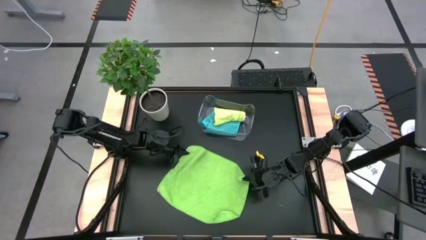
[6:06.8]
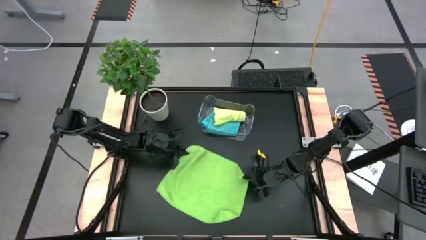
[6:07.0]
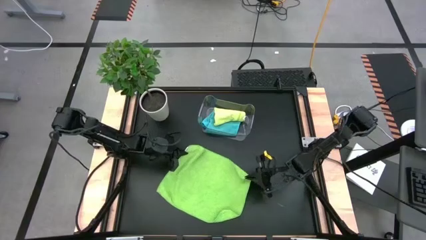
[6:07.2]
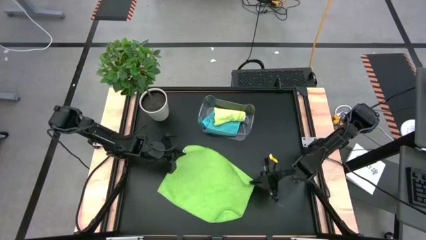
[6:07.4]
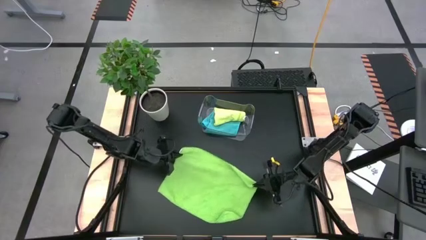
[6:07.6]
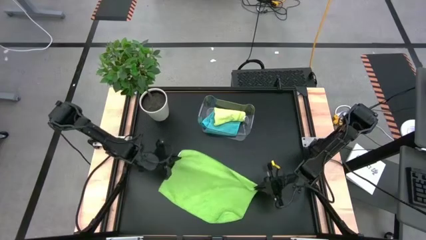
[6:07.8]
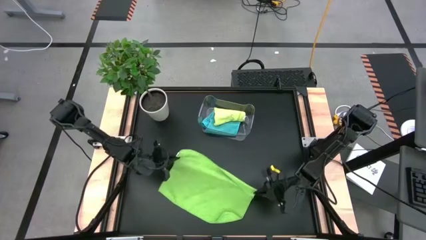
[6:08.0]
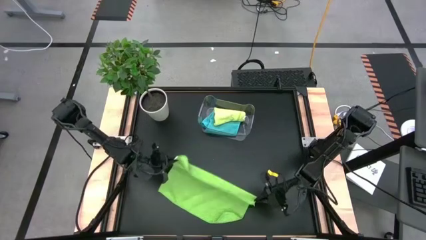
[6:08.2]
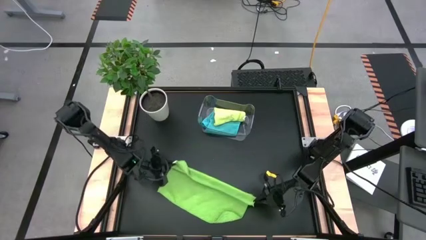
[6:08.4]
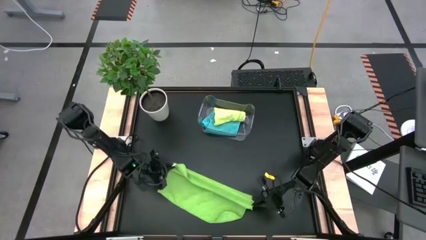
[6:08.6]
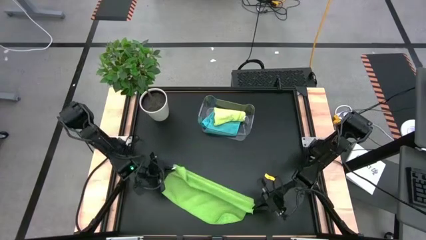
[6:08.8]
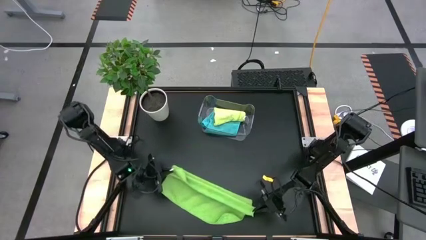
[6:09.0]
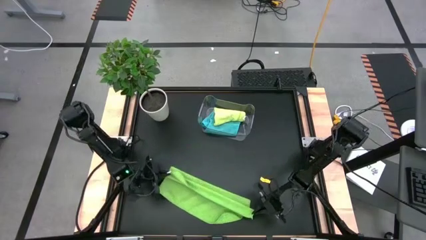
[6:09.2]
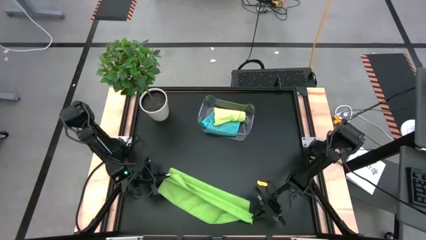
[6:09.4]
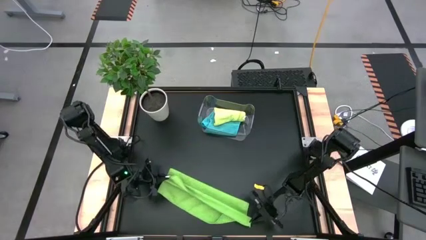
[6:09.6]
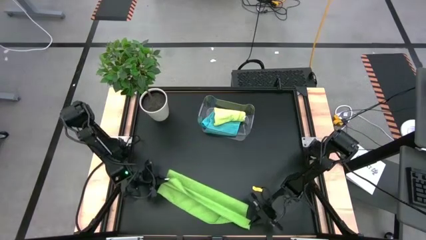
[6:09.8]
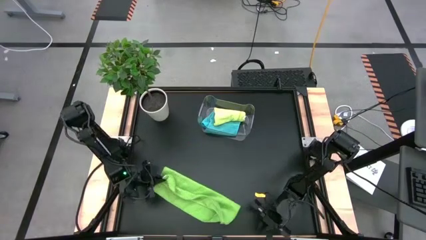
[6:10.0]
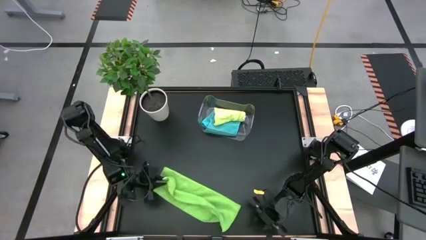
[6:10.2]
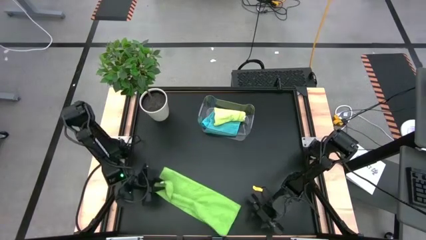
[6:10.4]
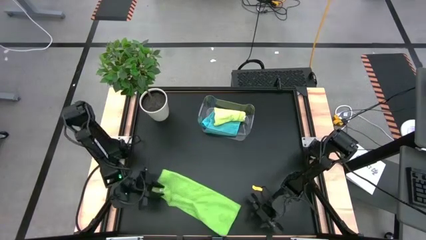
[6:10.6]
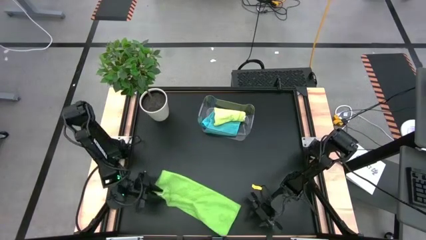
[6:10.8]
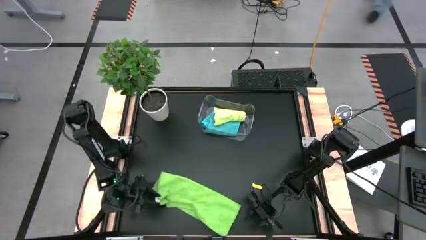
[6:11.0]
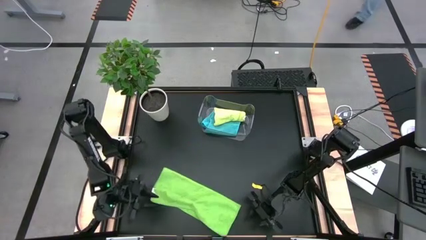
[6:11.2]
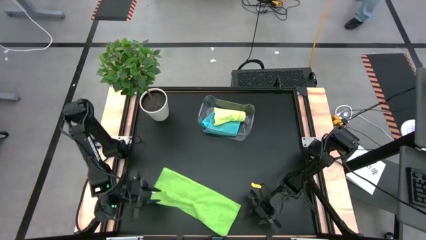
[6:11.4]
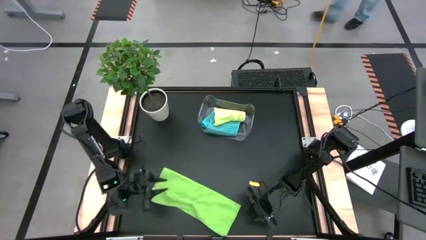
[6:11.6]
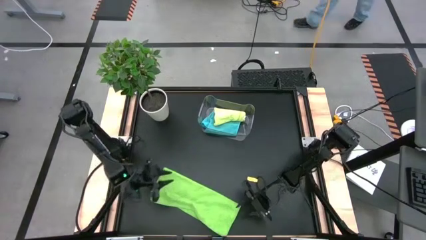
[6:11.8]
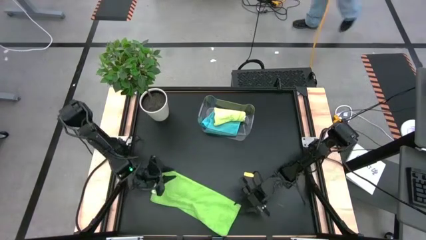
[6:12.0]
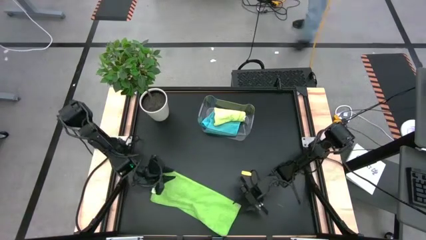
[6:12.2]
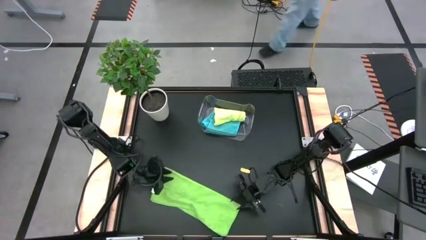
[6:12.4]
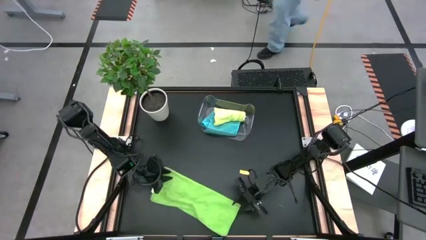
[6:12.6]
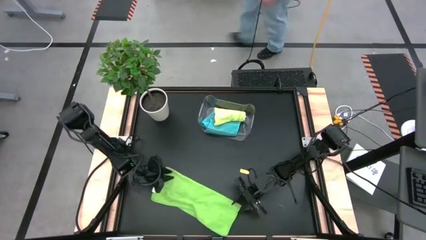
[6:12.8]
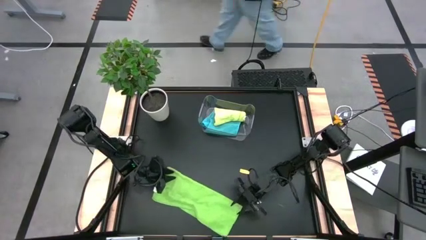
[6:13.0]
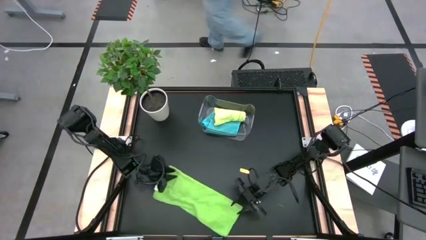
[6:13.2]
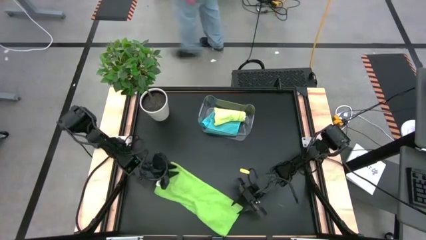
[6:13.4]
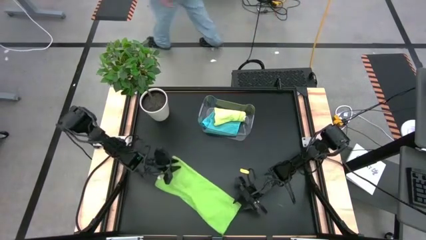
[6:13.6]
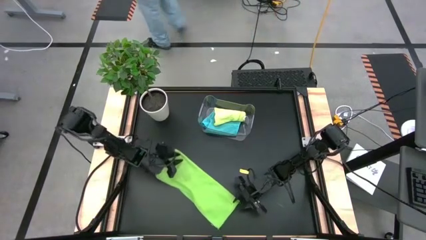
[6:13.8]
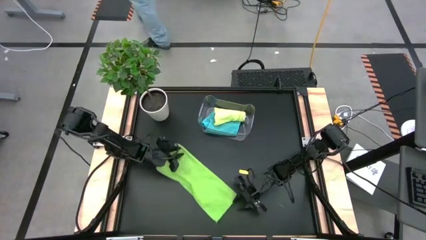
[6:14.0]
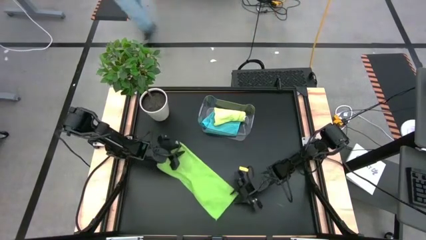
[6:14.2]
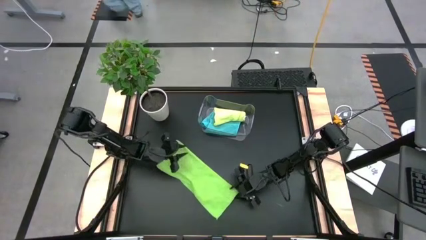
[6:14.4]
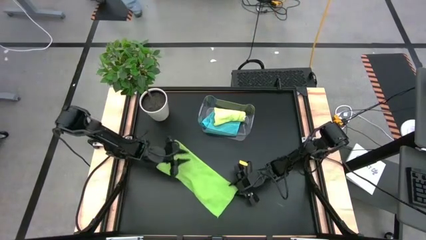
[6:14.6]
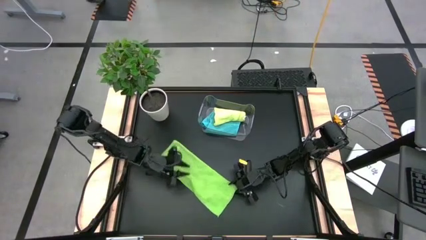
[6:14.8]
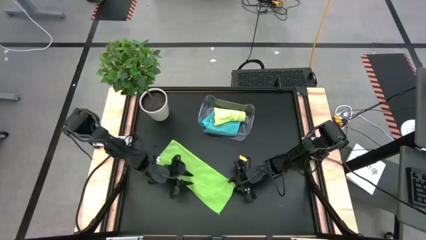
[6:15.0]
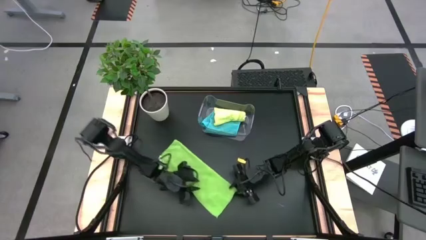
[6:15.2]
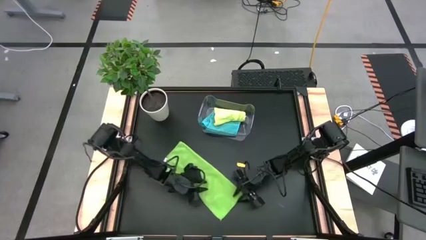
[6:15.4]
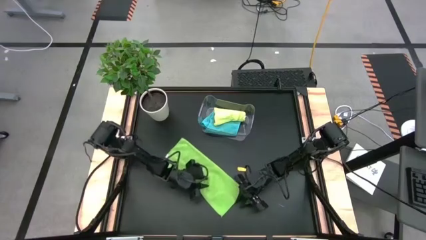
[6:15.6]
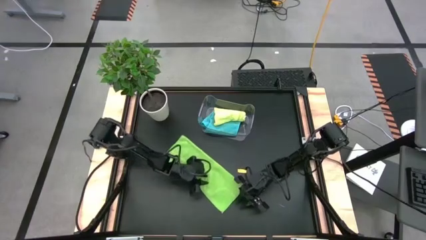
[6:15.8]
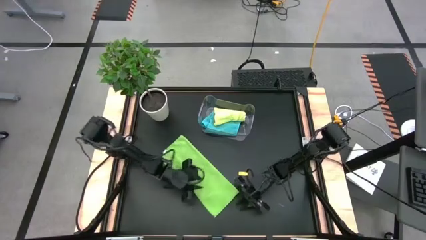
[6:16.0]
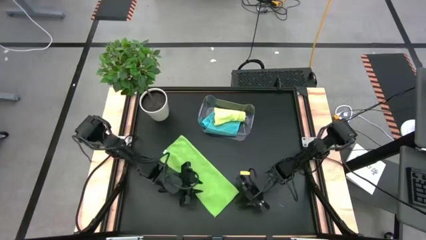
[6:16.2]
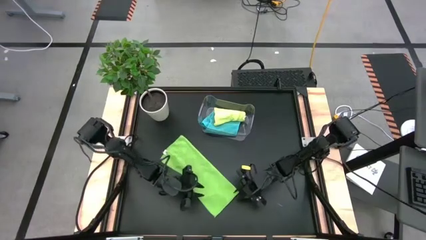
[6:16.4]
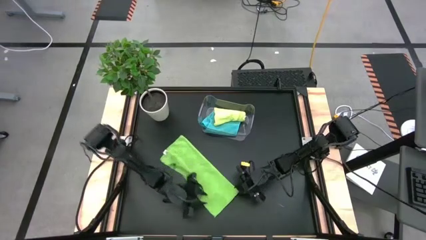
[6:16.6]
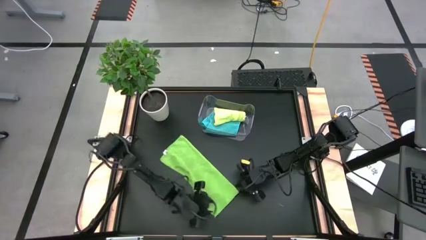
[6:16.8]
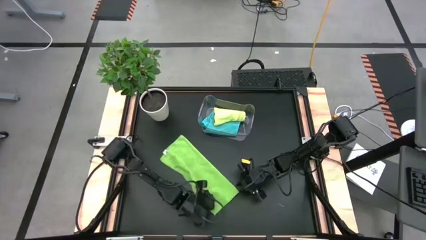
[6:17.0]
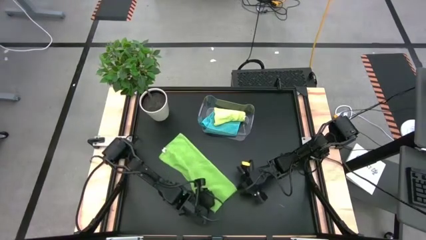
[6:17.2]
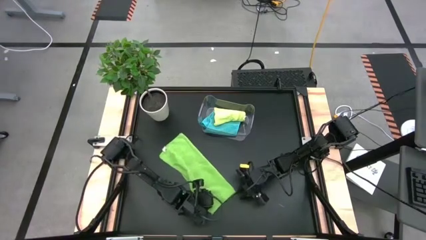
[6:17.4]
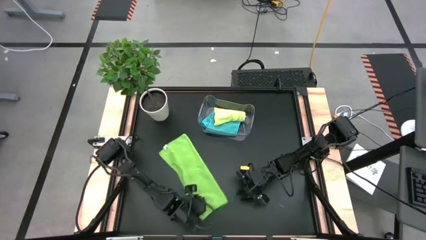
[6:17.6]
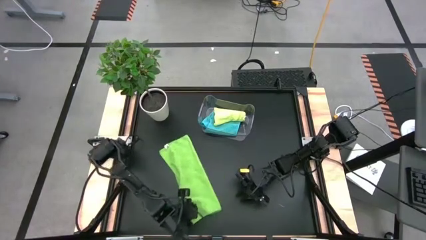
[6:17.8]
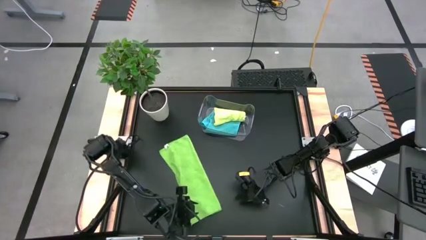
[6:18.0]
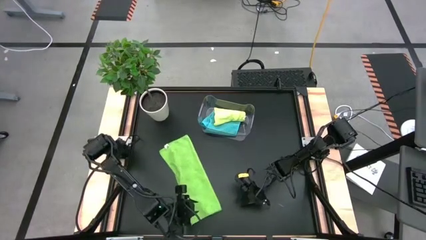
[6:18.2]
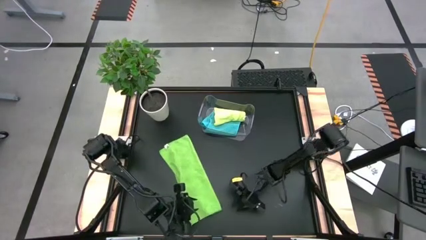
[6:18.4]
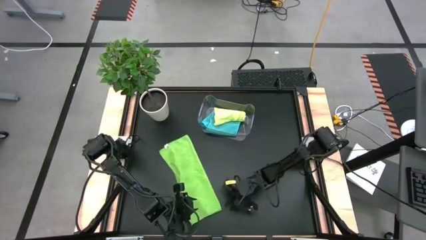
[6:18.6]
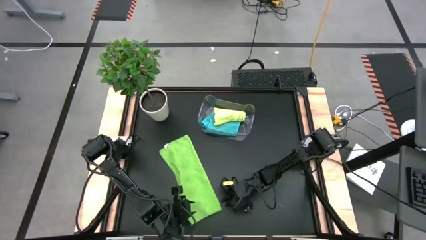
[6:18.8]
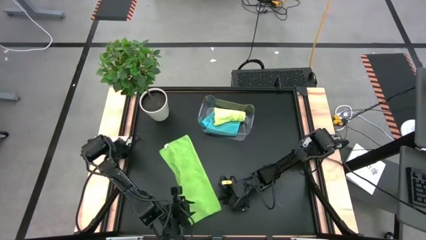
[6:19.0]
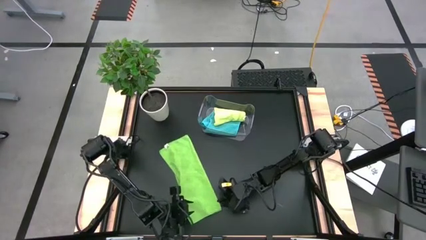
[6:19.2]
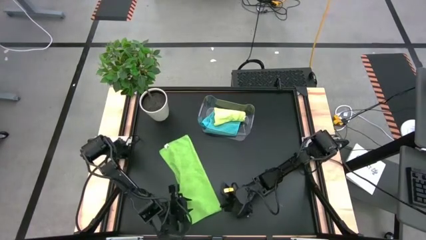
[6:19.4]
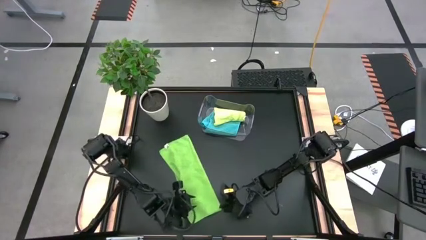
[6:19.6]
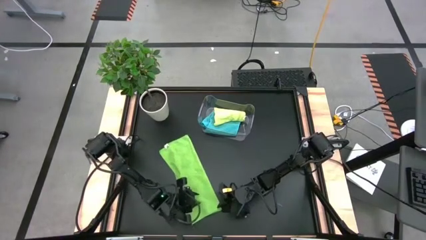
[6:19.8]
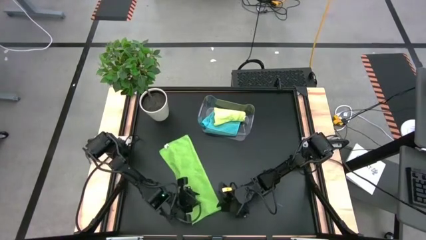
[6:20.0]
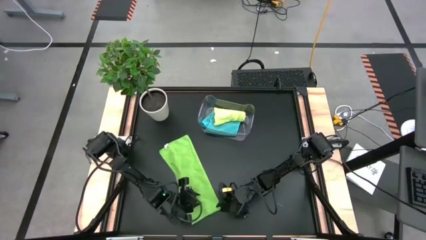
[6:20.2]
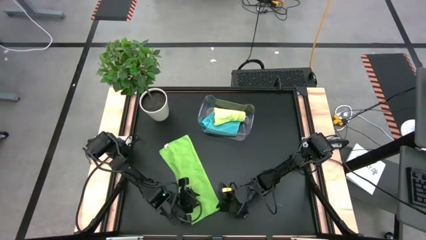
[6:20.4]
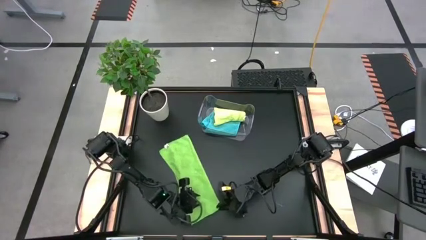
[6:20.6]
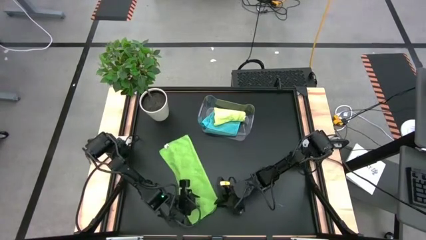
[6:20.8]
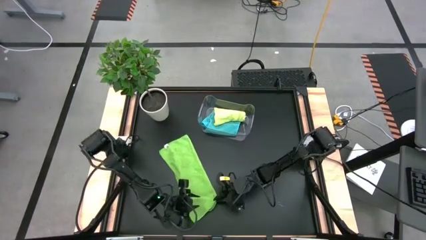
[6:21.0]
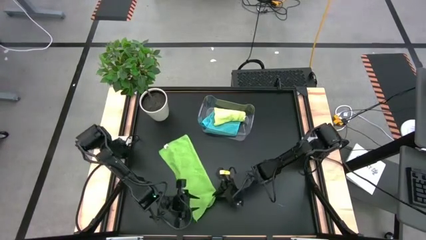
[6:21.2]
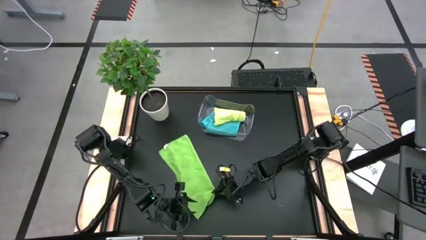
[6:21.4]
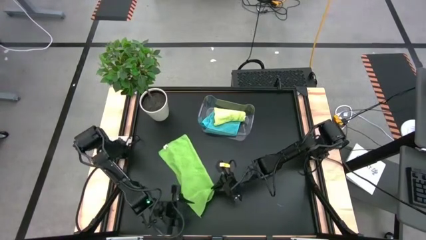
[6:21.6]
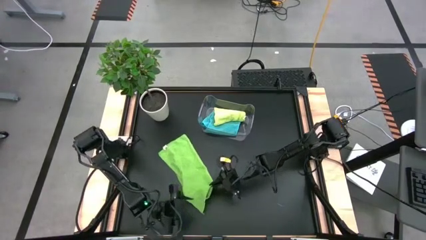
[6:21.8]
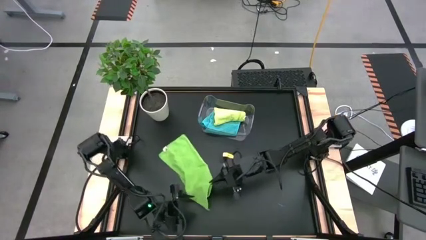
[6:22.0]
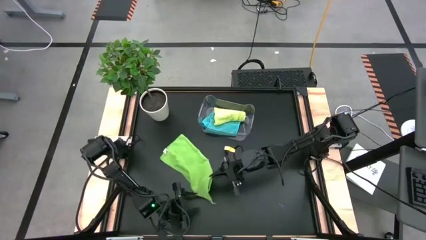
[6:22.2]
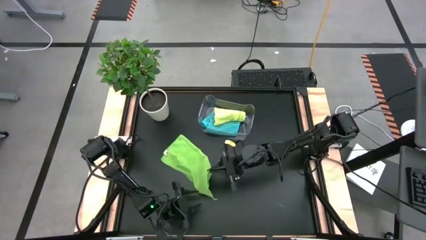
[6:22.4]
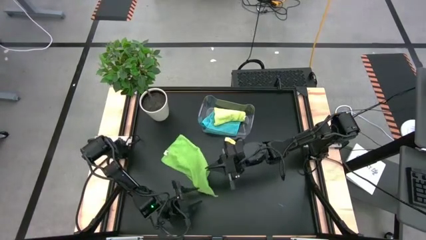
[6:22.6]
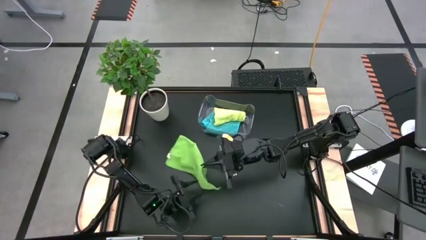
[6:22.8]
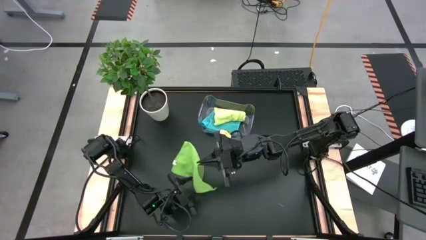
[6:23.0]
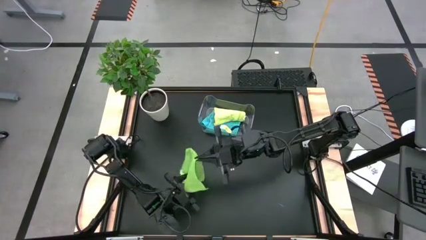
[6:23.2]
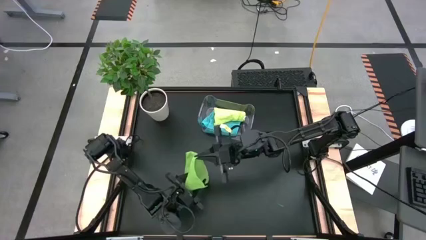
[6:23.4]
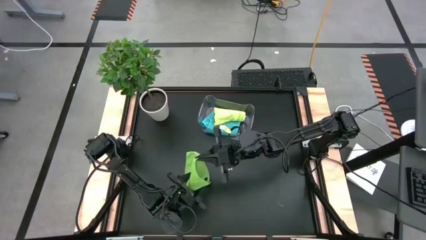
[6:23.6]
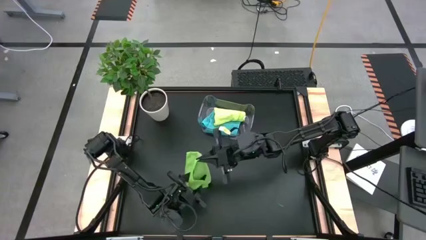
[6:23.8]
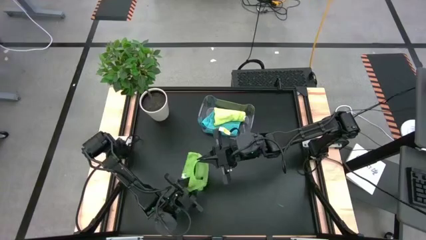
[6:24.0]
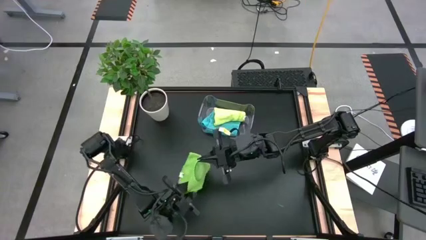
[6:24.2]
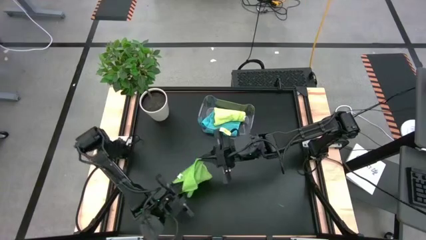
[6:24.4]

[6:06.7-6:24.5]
Task: Fold microfiber towels
Fold the green towel
